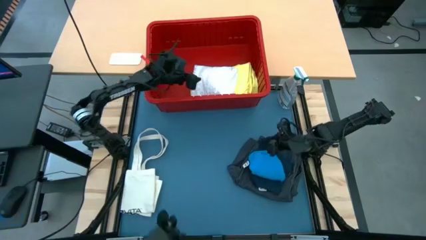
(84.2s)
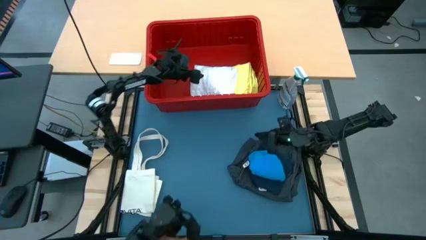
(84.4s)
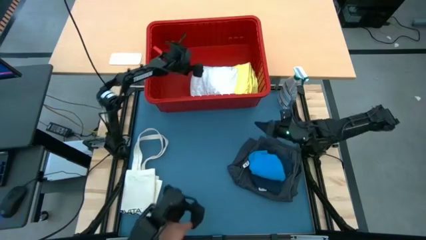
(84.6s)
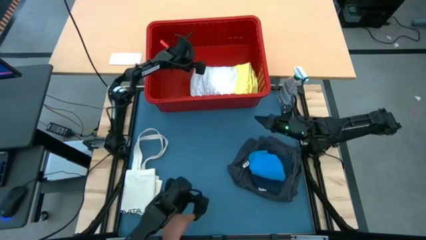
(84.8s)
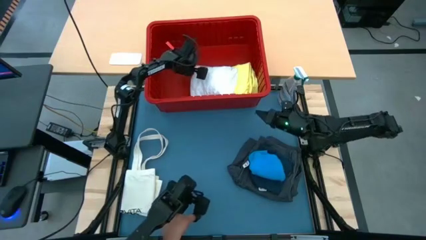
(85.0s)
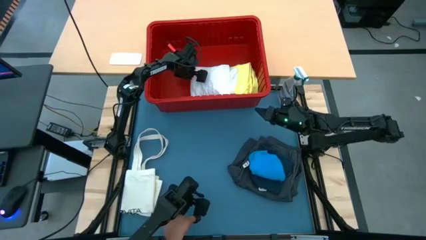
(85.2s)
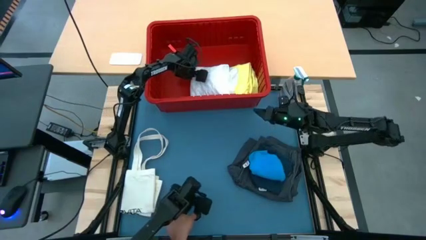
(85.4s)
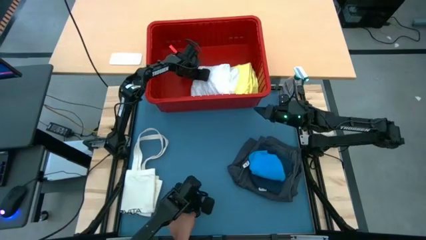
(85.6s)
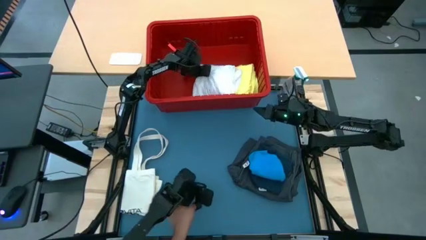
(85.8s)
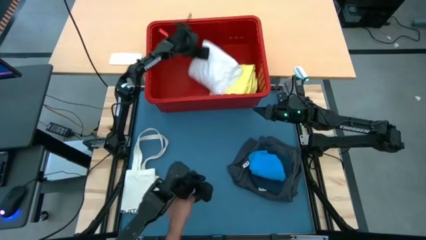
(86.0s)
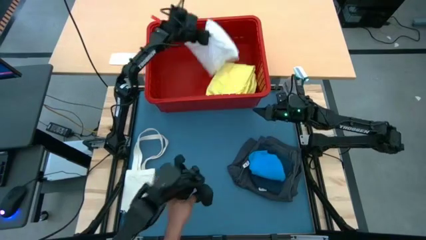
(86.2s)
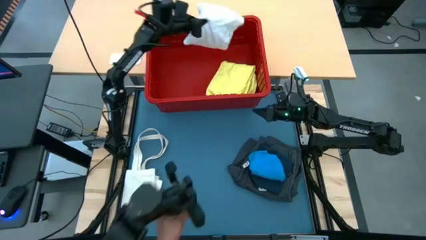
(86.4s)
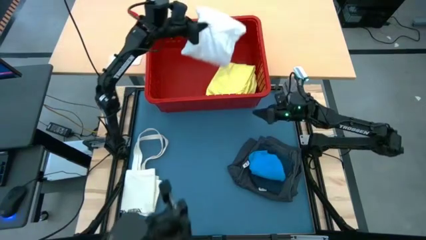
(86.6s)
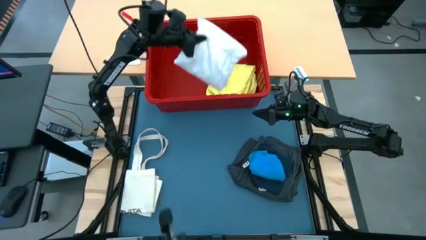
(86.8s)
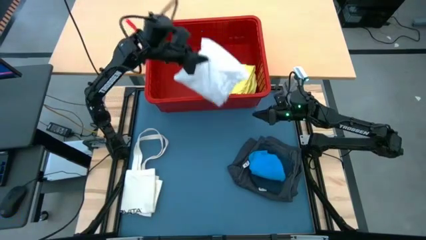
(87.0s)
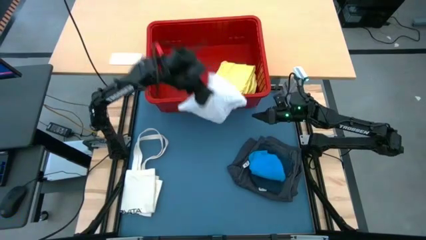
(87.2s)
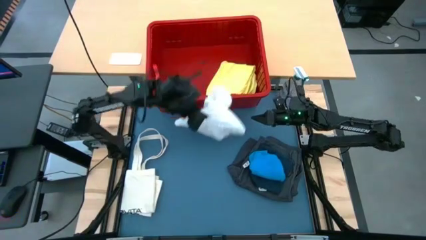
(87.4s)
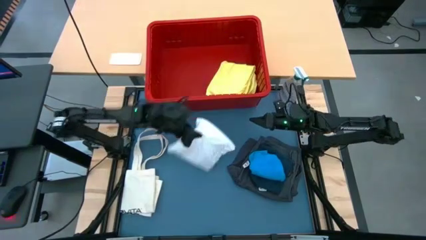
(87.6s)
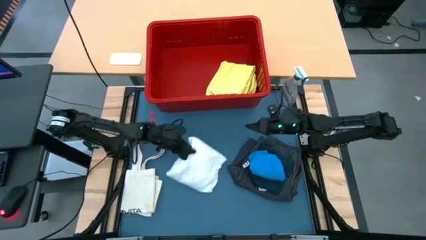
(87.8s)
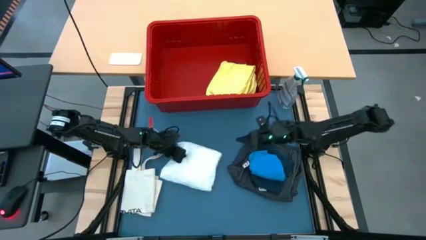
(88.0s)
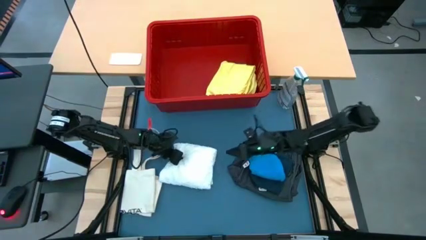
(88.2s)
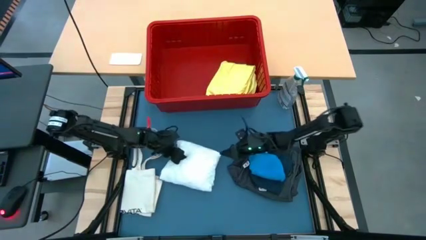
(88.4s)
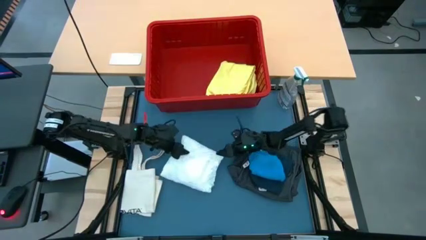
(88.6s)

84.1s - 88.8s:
Task: Fold Laundry from Bin
Remove the white shirt from the bin

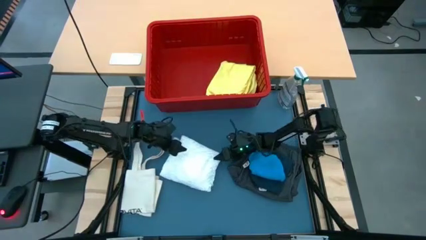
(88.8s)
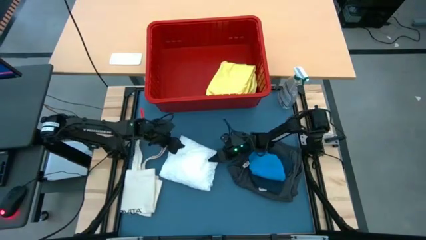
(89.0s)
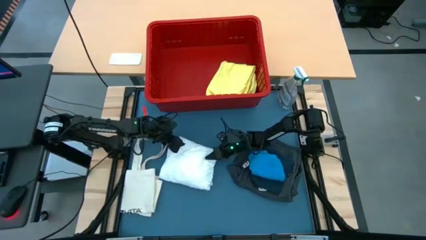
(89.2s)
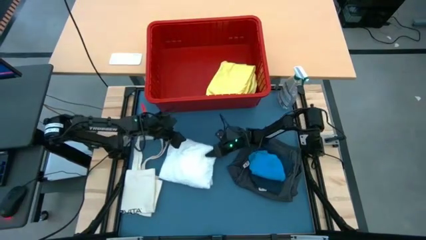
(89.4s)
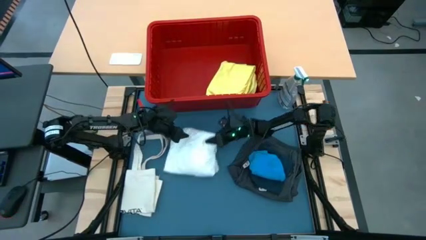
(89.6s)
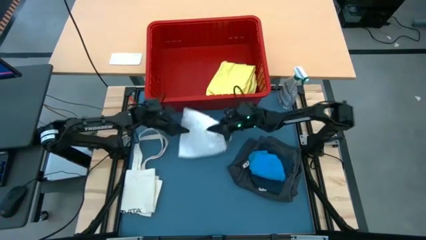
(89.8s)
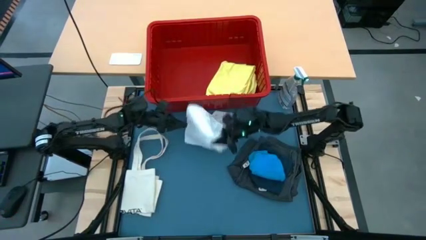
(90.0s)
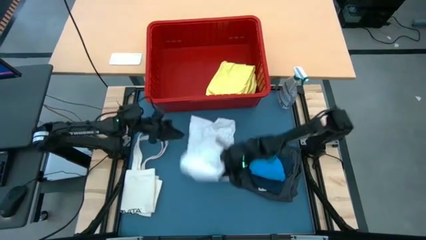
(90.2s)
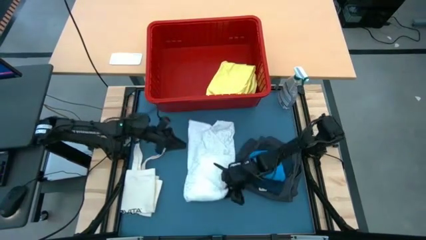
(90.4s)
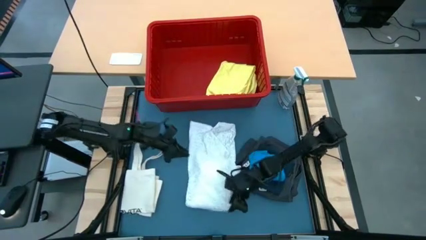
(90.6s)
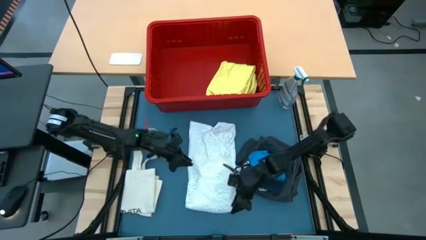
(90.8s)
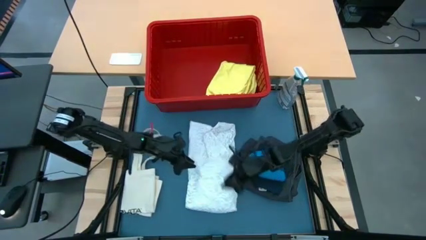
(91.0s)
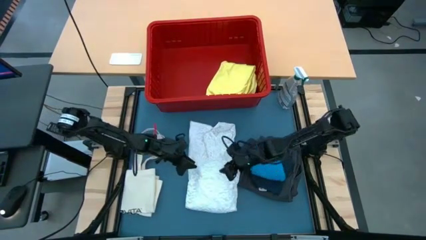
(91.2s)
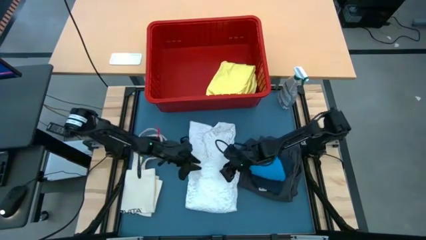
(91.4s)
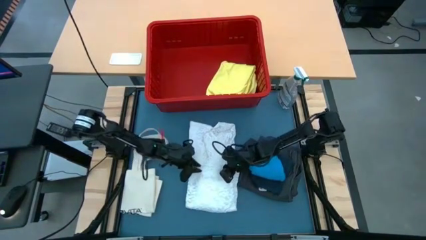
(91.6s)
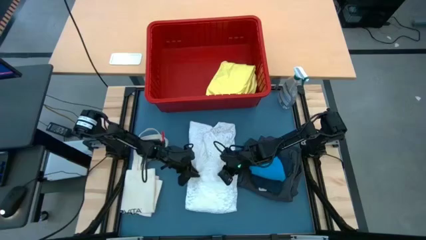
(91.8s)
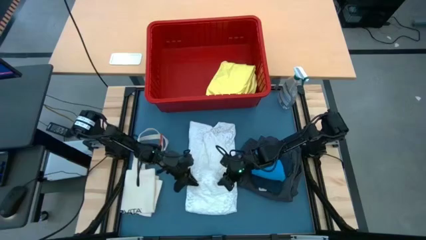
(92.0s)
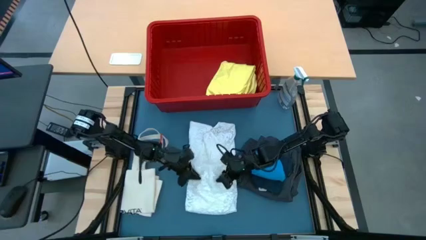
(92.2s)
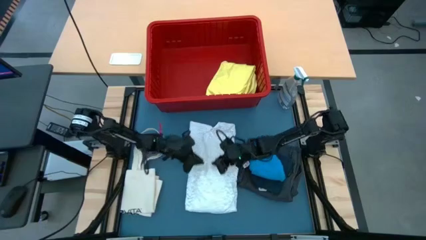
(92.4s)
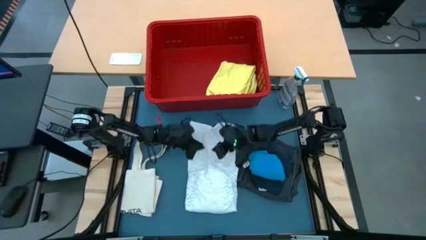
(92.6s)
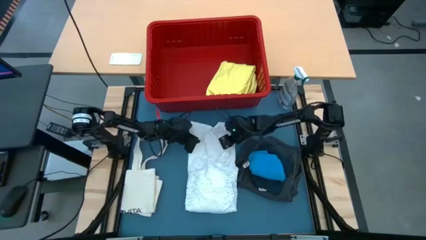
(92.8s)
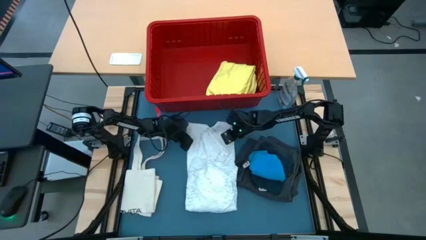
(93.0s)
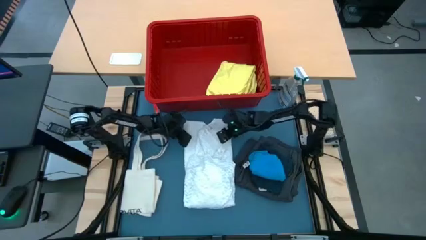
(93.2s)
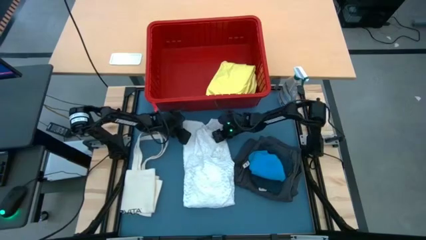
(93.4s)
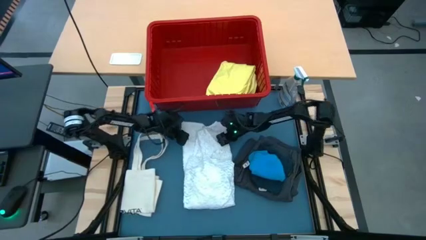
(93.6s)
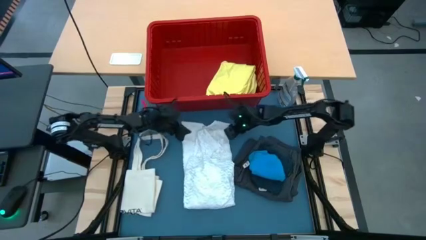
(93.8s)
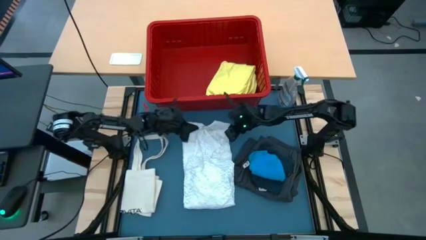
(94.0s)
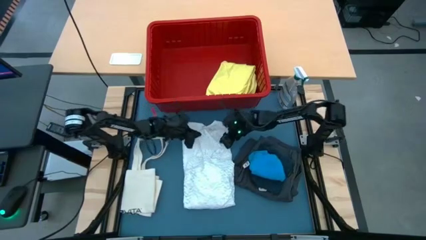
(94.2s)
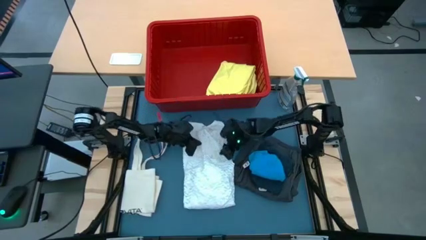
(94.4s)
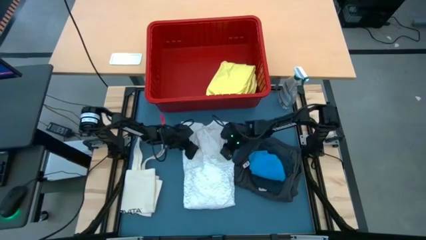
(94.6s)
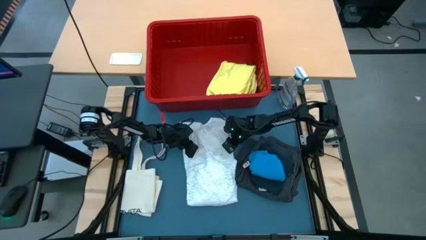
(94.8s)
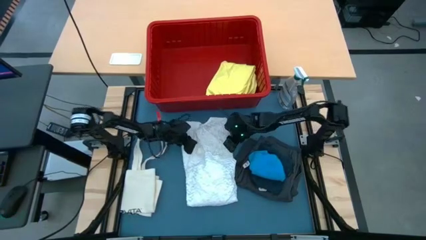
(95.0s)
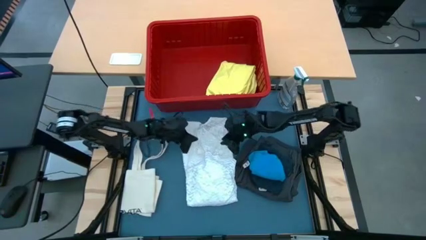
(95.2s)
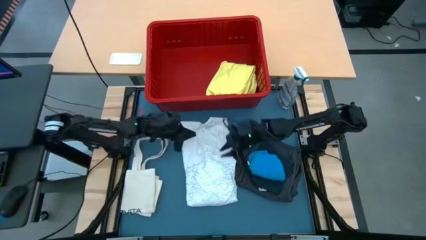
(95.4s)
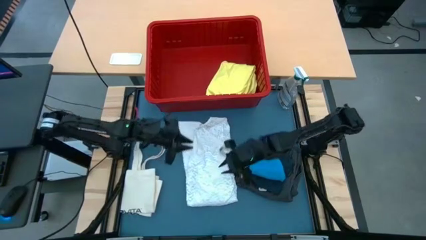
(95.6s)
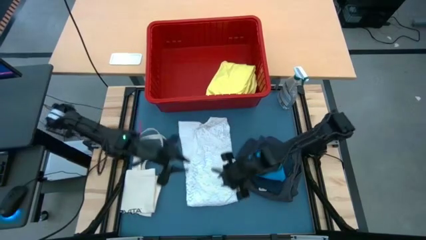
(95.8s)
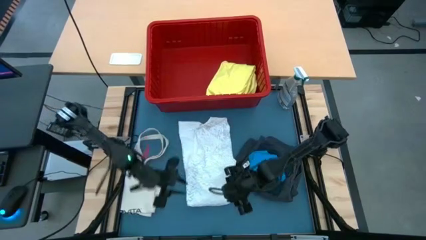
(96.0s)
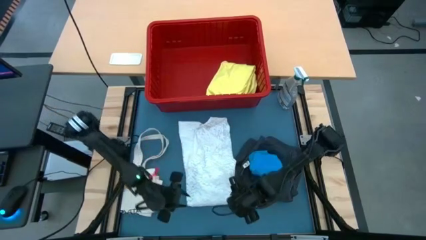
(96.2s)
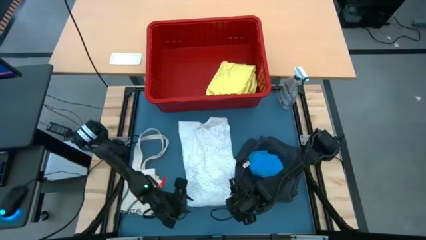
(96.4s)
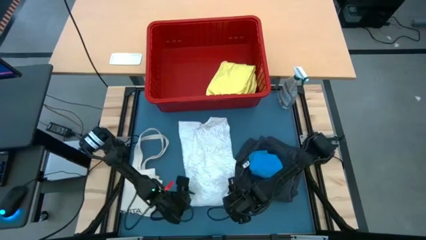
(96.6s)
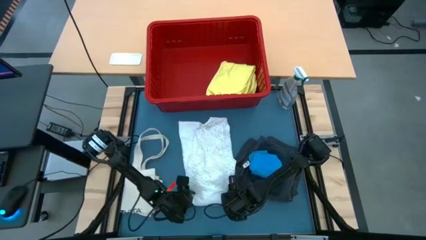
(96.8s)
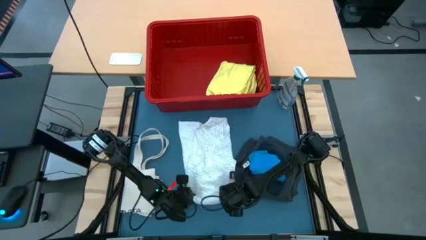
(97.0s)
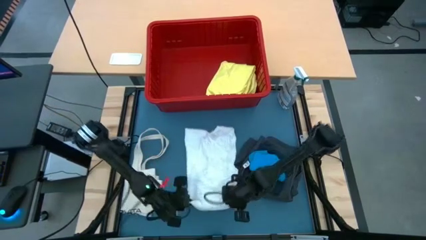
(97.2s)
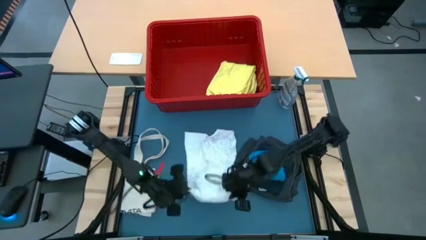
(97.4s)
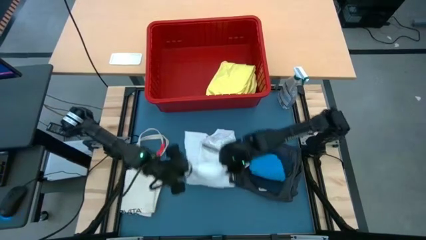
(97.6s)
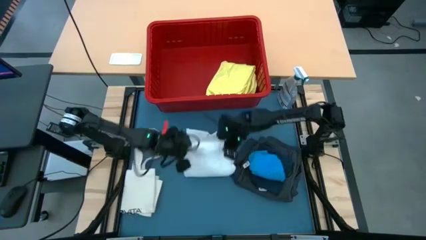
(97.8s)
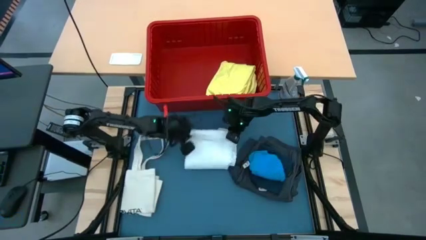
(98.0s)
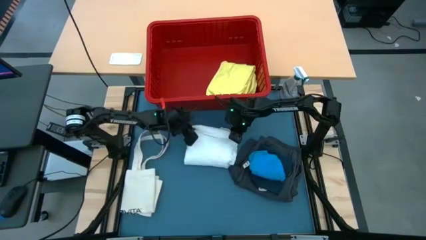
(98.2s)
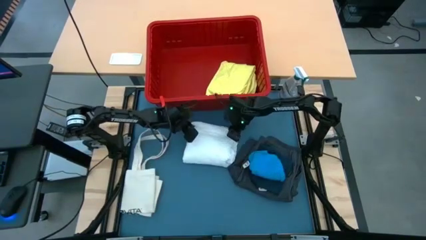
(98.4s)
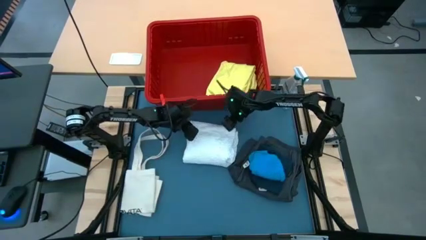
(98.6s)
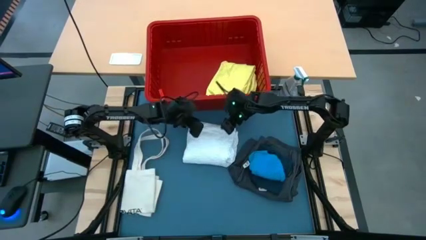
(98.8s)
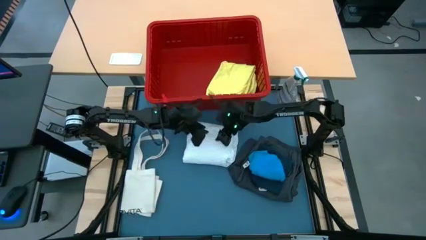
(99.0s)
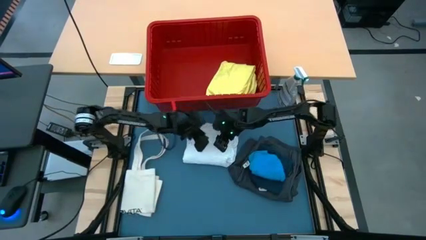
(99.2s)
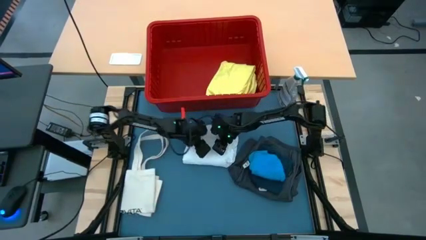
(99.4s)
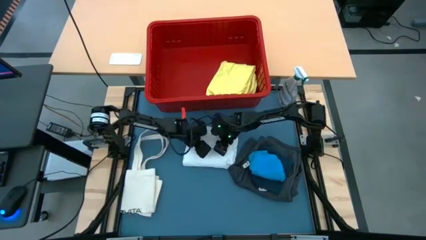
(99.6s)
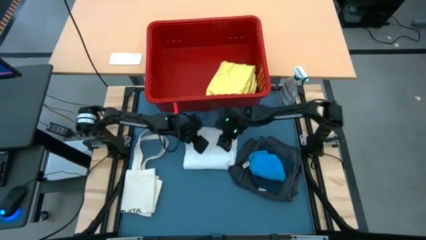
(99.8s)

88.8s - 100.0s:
Fold the white shirt

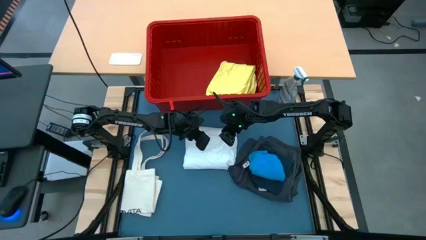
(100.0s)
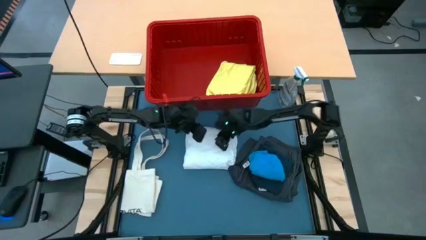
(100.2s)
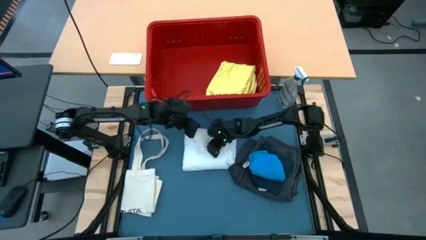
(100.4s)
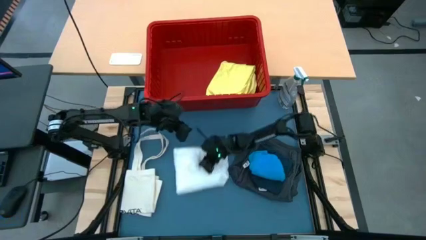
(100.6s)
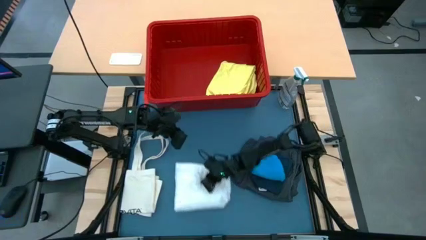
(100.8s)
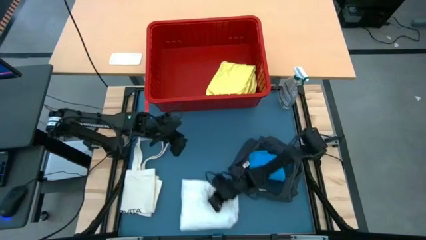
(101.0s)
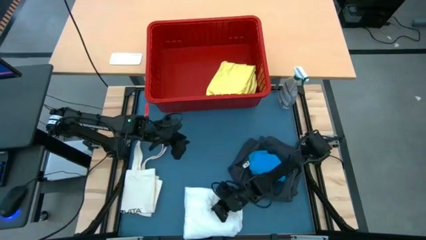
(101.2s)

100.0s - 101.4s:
Move the folded white shirt to the bottom of the table

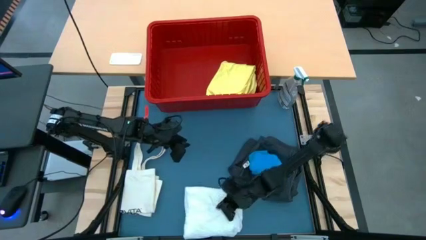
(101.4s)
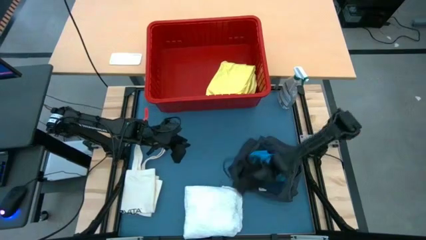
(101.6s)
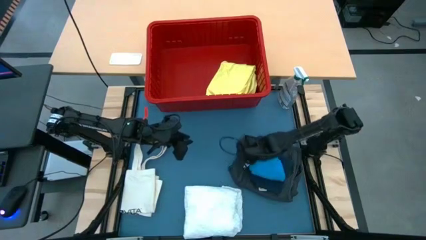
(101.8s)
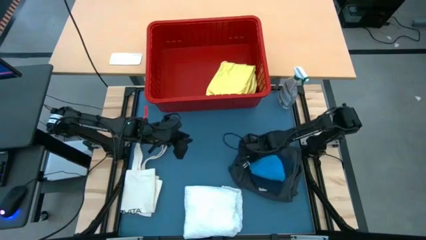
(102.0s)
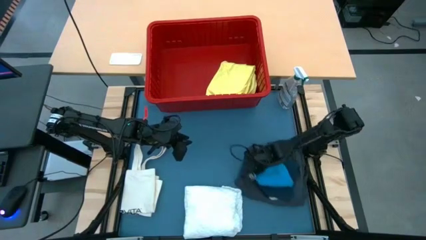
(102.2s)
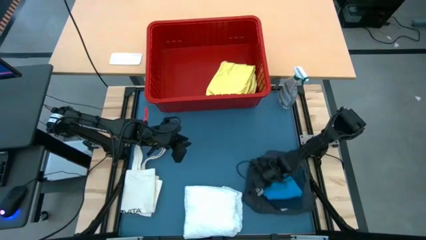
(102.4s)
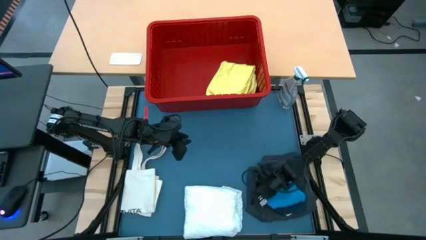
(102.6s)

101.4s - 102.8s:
Move the stacked folded blue shorts to the bottom right of the table
